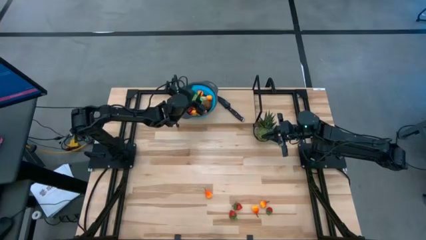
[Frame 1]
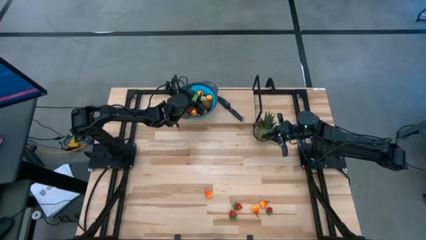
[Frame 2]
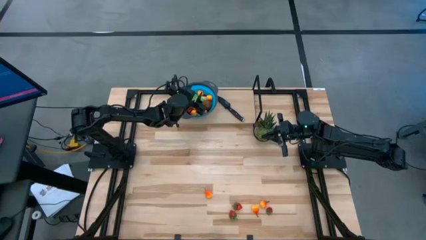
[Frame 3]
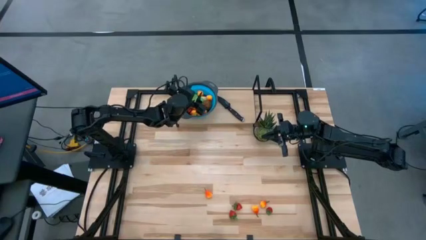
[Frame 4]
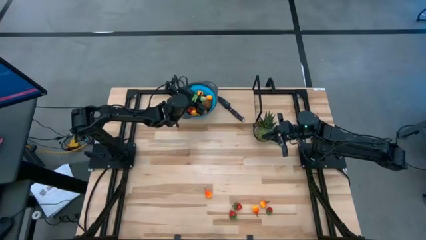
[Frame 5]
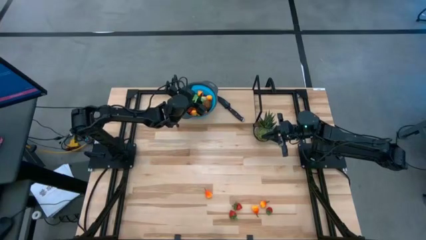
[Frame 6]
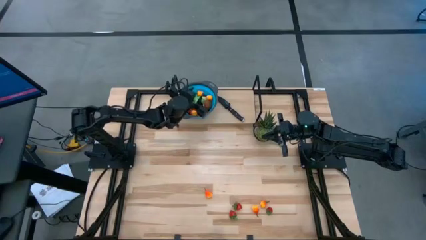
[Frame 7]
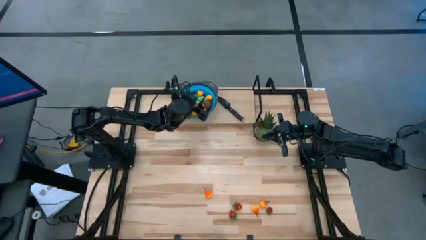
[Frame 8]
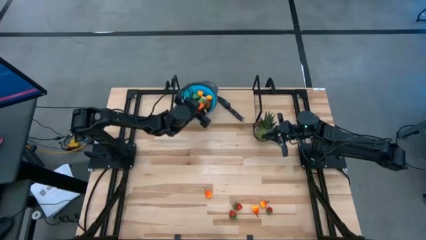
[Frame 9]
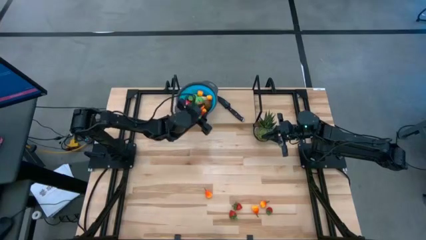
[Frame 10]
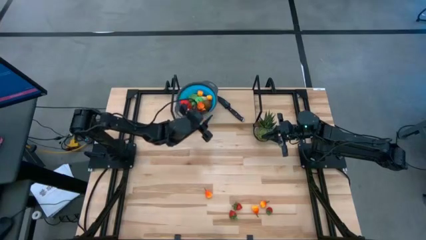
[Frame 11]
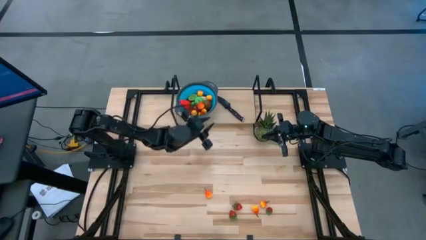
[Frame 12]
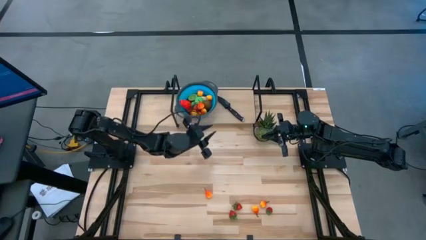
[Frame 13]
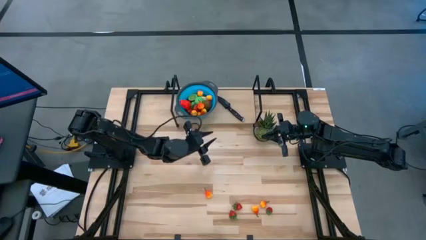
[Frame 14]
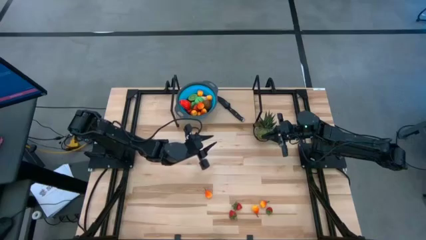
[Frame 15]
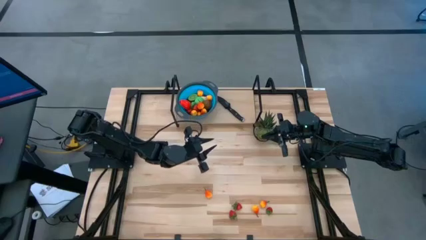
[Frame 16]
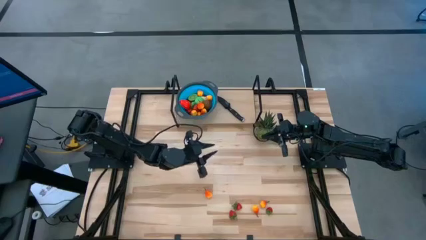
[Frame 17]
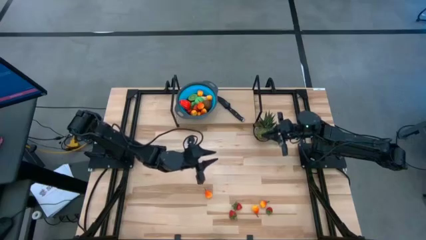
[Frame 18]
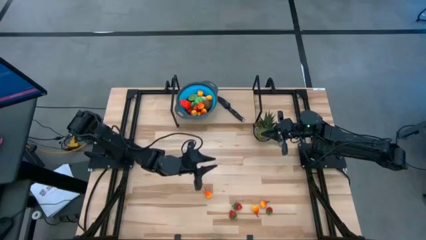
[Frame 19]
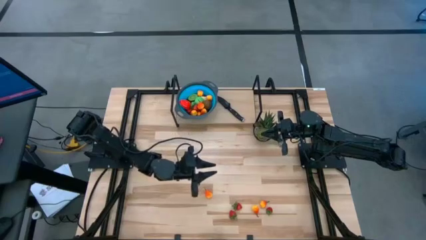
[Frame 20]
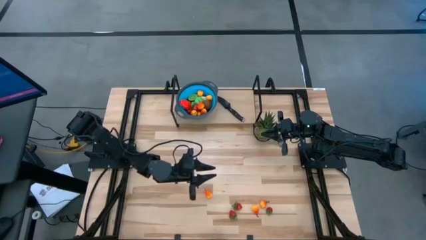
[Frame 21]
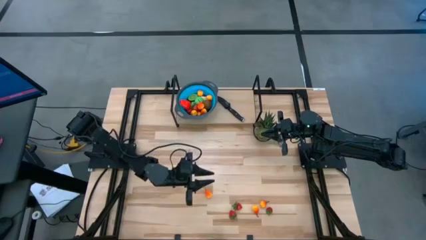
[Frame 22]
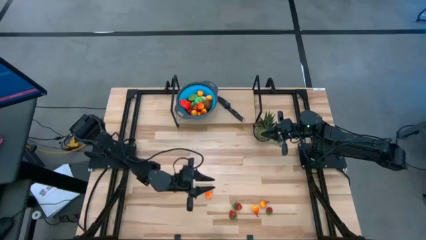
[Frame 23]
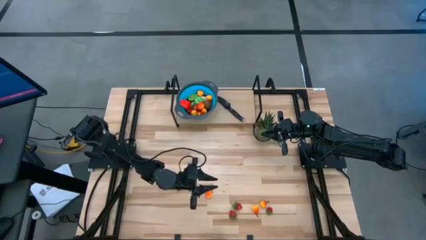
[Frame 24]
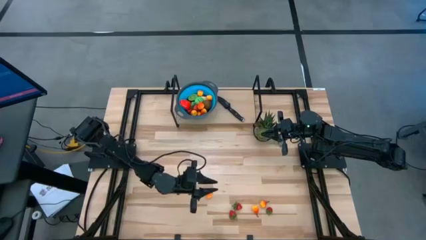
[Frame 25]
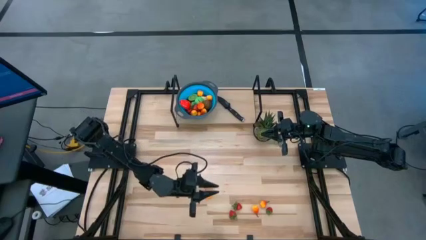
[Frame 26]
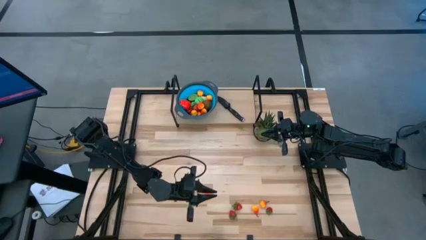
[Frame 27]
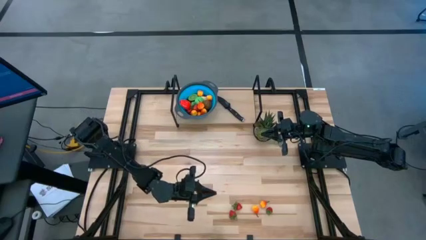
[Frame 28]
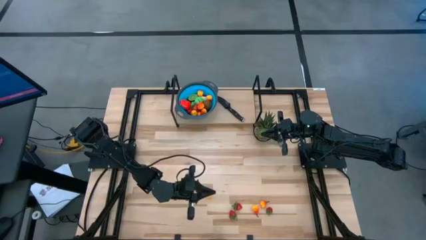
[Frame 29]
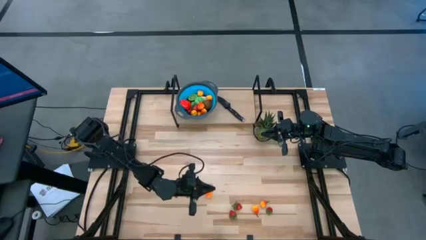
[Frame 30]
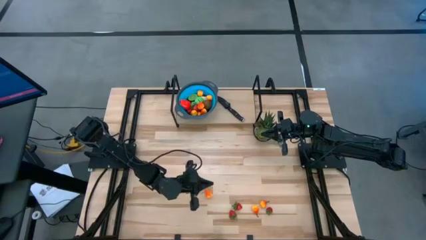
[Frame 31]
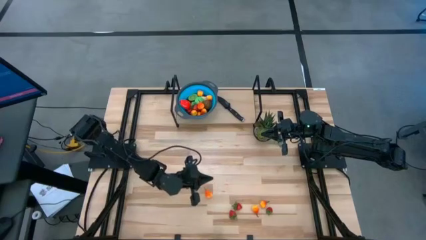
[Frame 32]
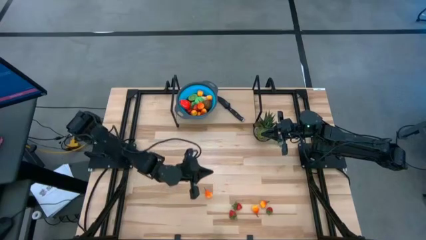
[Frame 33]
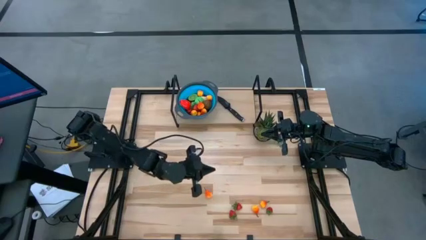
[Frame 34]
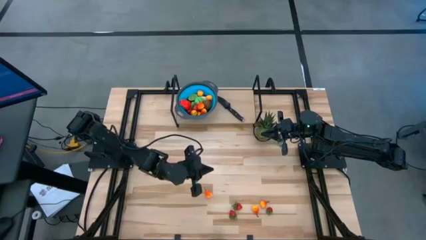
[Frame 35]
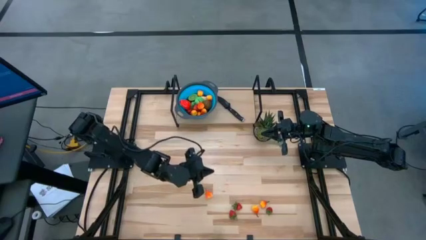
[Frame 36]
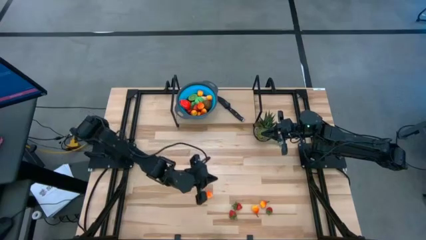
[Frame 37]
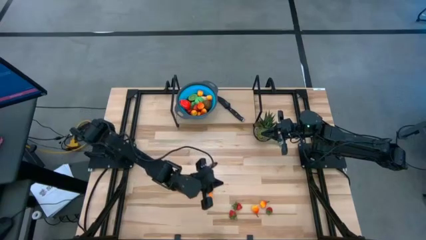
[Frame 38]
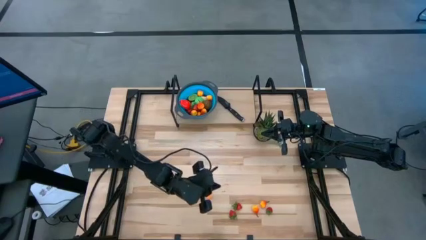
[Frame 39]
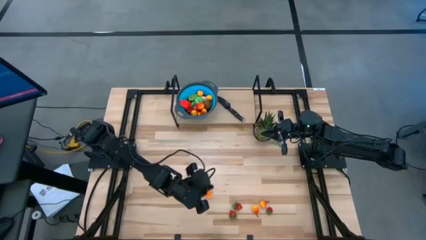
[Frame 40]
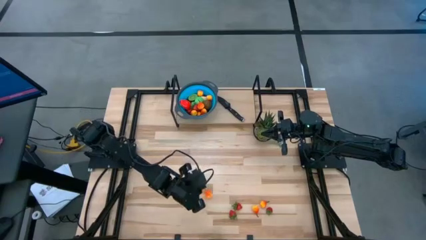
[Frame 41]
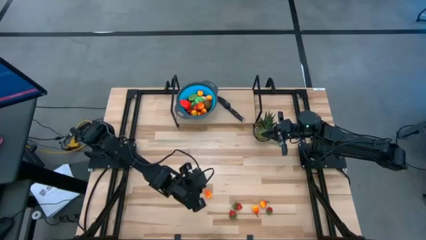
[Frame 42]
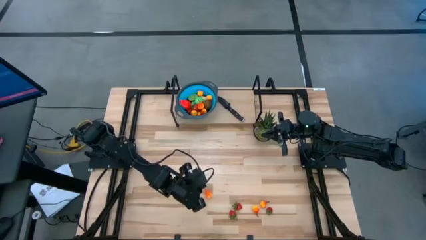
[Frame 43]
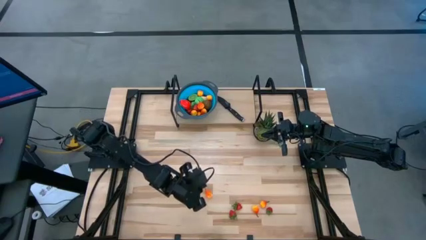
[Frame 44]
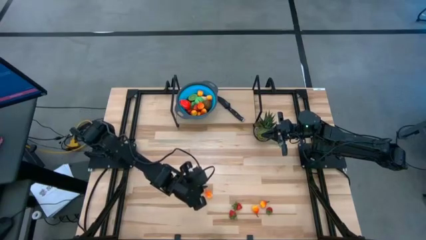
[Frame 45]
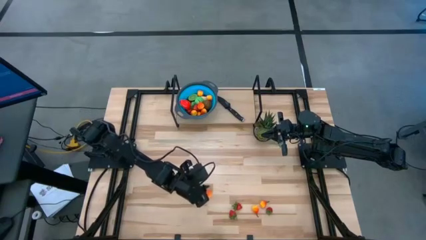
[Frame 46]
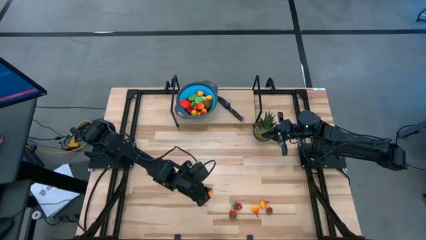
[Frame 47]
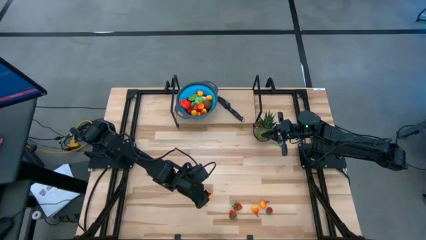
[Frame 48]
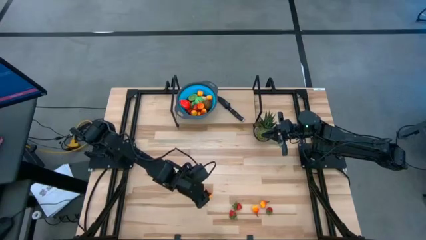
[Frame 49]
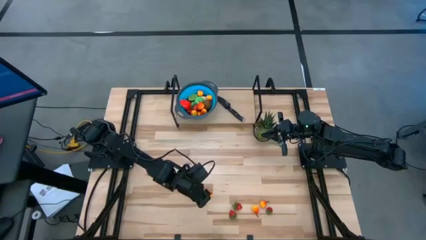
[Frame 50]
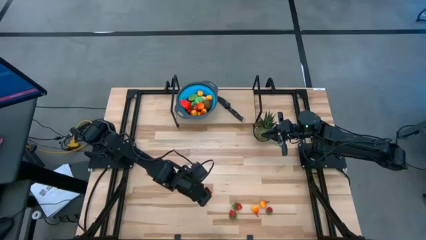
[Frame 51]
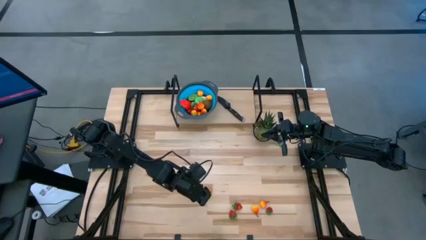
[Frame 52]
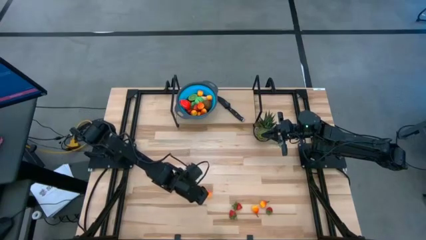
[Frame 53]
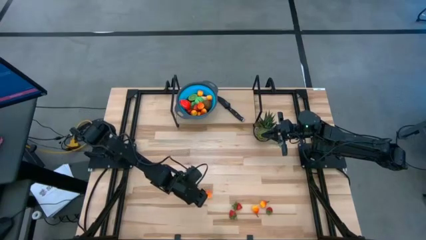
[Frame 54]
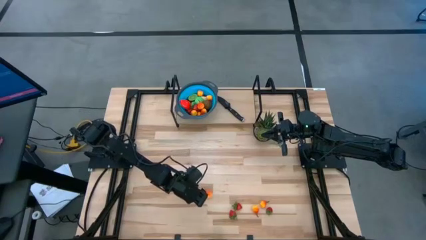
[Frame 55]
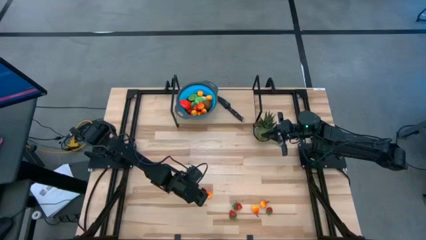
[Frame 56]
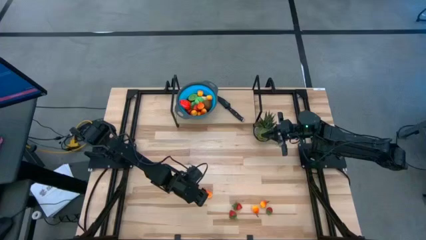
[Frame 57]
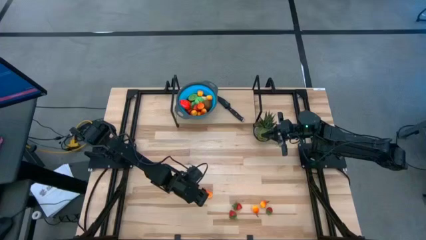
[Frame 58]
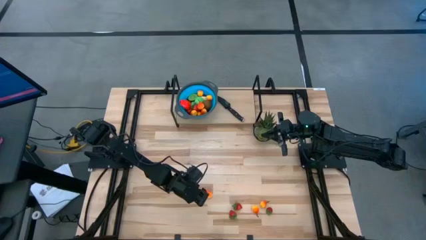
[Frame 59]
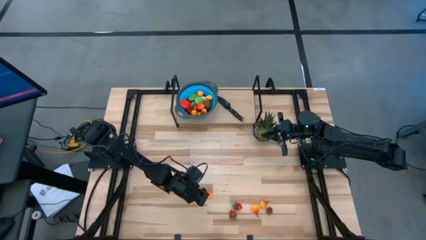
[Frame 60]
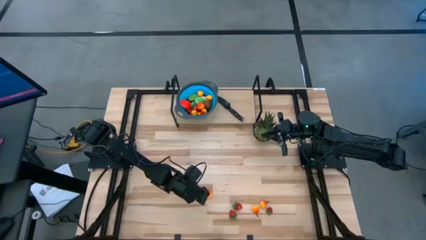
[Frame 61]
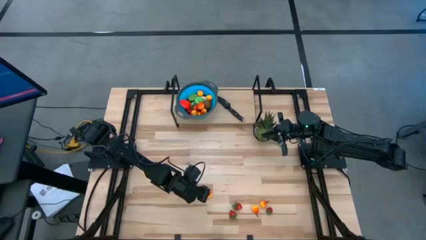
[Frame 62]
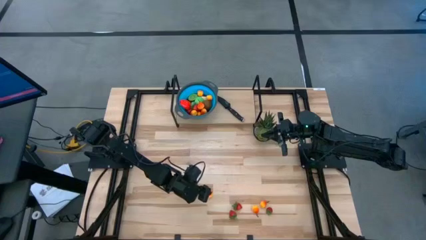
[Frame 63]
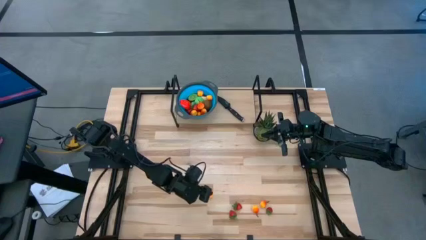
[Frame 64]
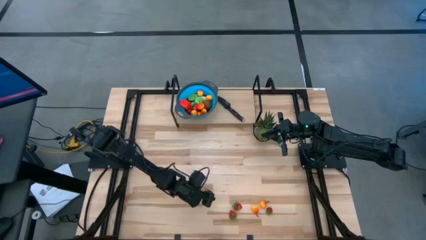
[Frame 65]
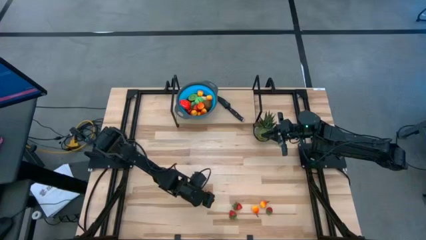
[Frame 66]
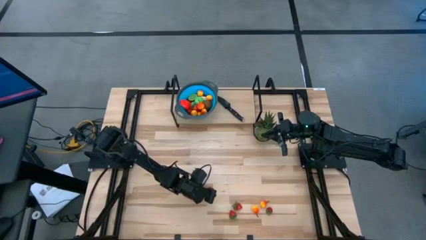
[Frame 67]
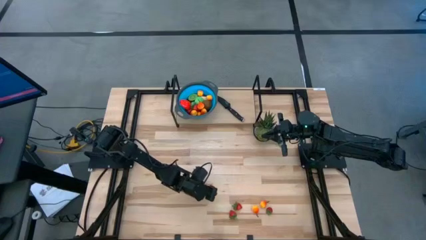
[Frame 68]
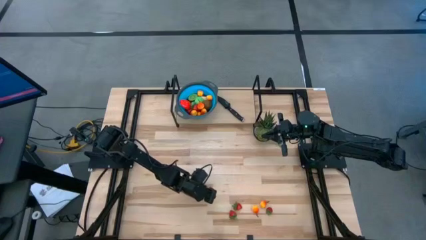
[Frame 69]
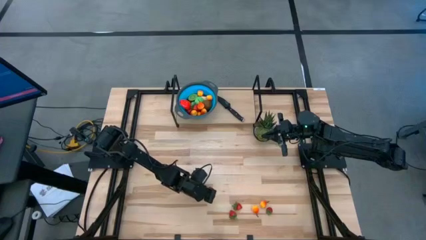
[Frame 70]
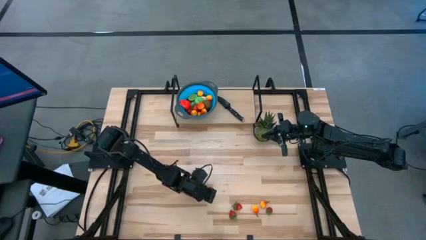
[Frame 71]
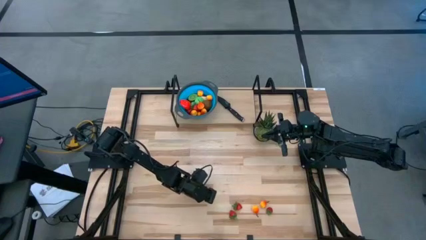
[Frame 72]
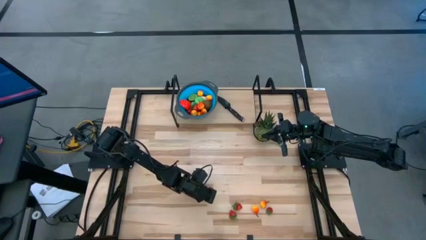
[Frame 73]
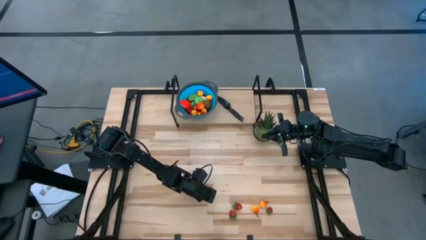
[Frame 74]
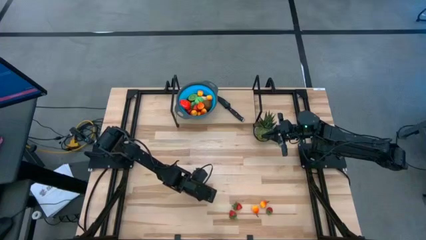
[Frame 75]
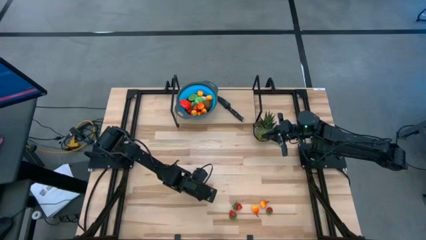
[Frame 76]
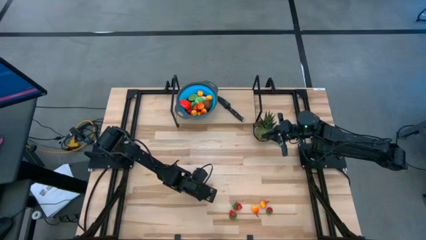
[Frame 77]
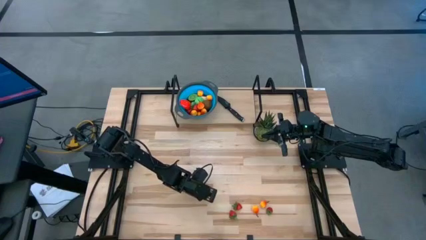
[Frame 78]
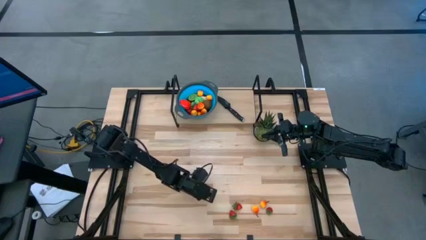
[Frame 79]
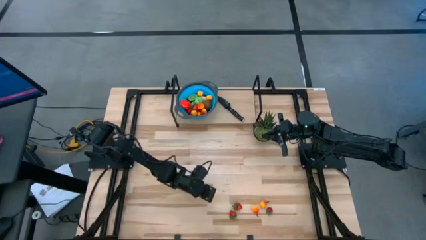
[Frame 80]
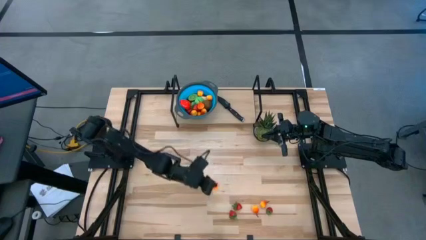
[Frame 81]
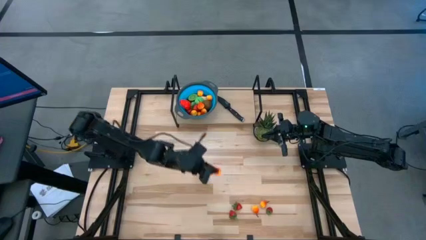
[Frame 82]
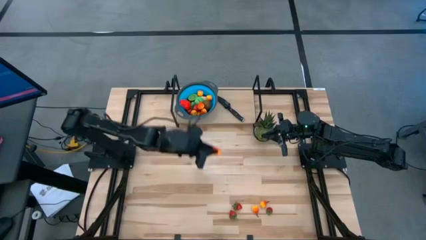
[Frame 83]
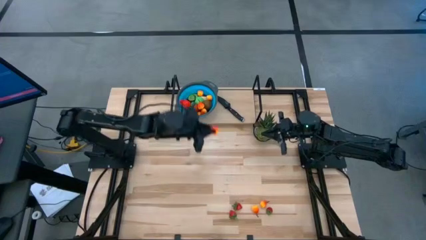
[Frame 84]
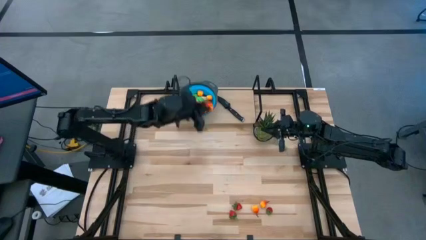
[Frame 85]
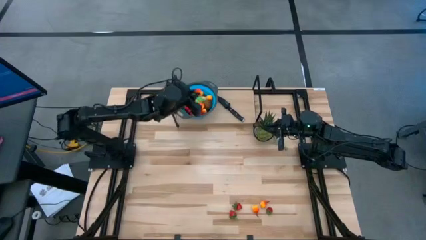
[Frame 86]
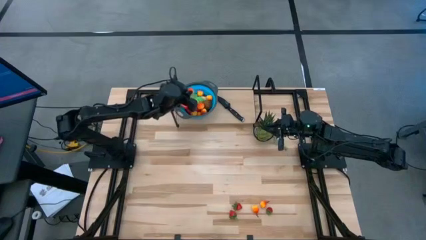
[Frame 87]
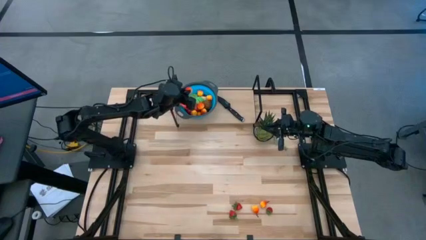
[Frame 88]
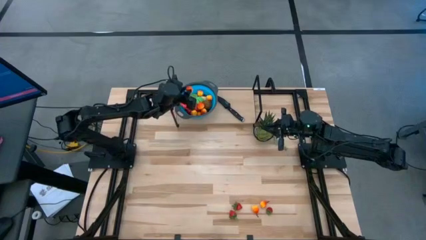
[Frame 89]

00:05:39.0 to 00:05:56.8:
Task: Pick & Place Fruit
Put the pear into the basket
